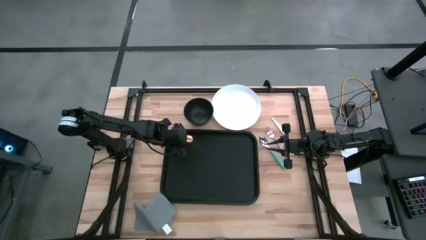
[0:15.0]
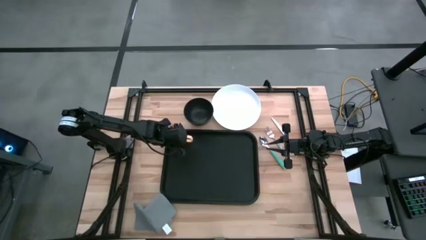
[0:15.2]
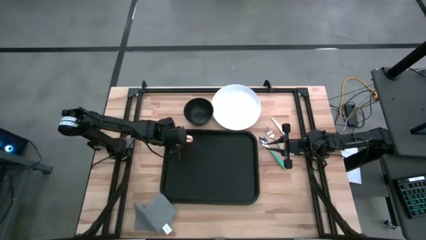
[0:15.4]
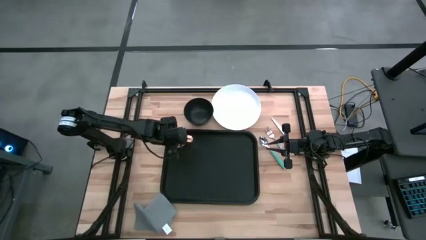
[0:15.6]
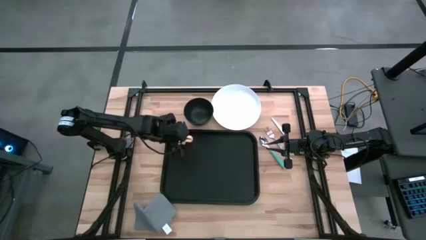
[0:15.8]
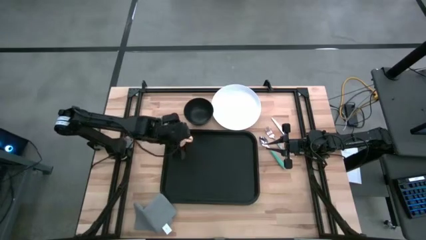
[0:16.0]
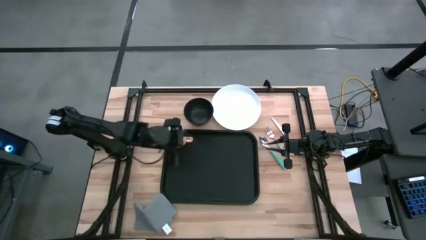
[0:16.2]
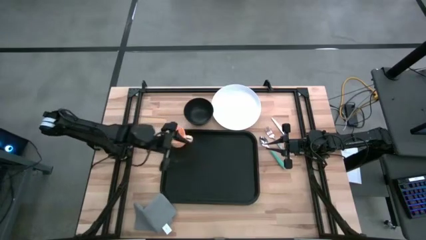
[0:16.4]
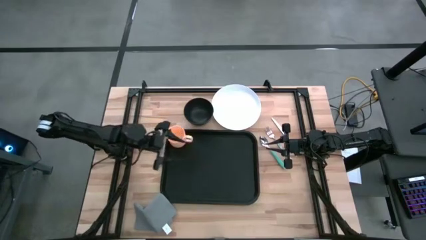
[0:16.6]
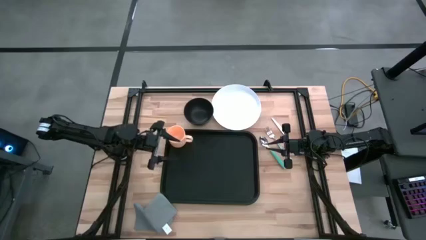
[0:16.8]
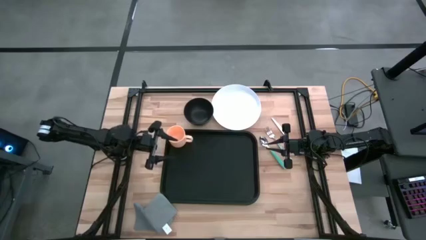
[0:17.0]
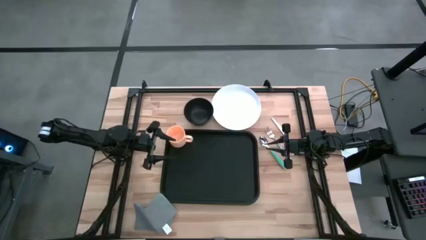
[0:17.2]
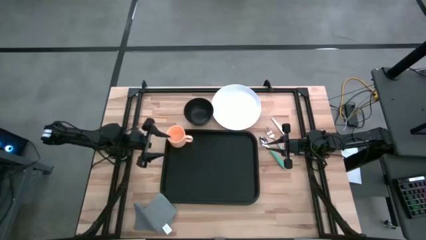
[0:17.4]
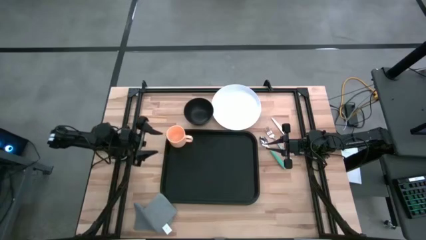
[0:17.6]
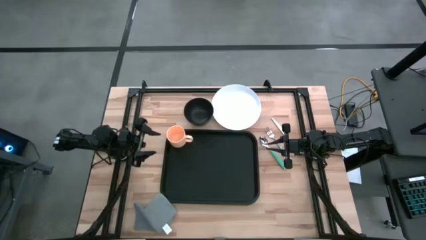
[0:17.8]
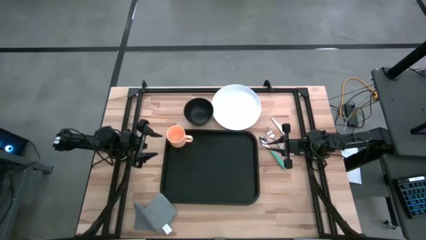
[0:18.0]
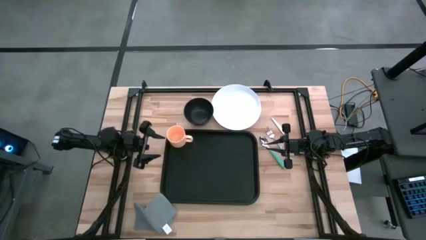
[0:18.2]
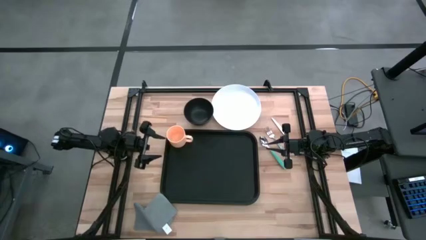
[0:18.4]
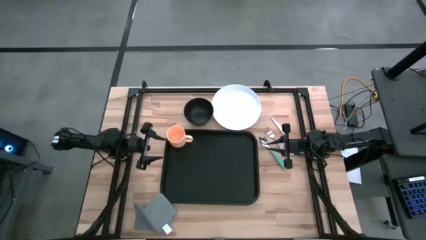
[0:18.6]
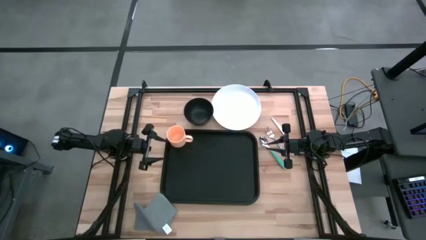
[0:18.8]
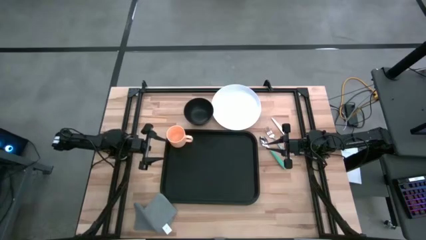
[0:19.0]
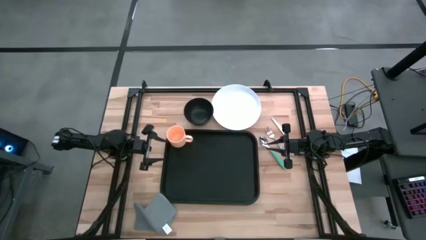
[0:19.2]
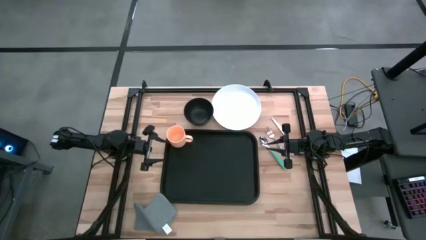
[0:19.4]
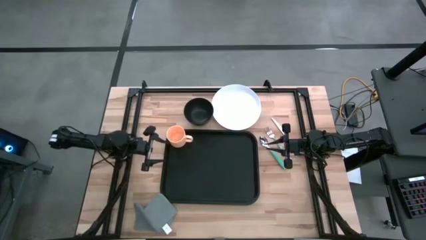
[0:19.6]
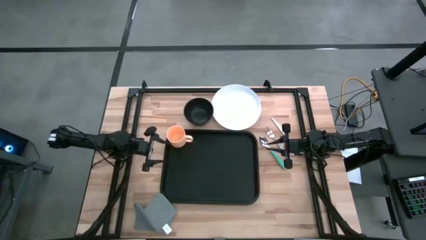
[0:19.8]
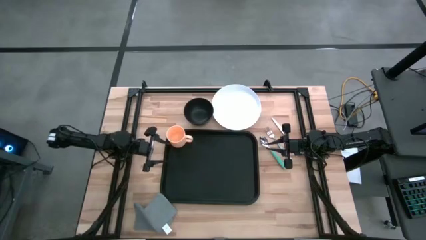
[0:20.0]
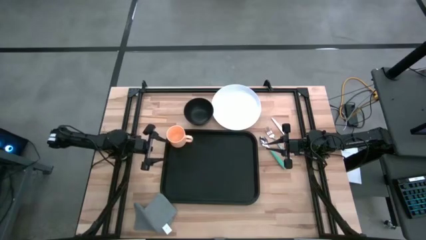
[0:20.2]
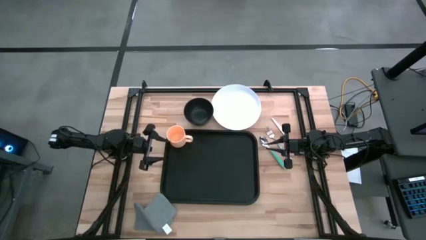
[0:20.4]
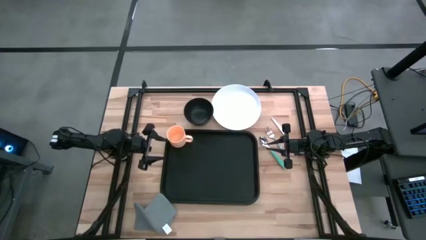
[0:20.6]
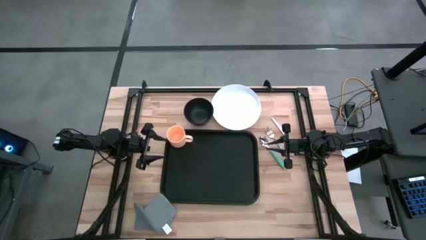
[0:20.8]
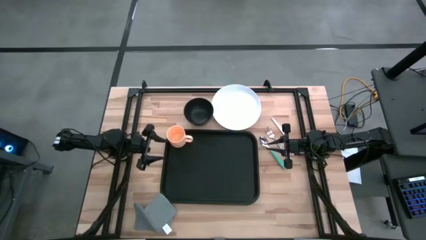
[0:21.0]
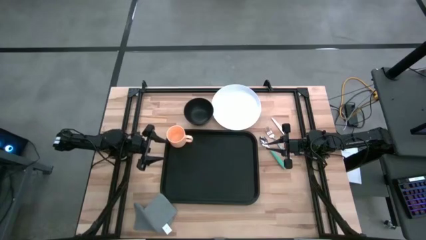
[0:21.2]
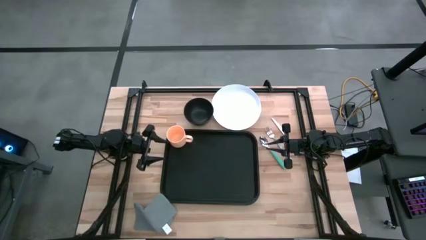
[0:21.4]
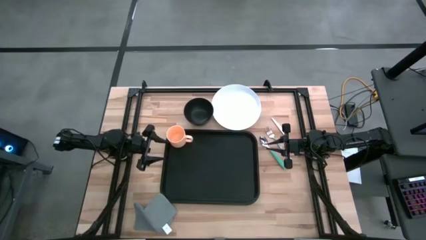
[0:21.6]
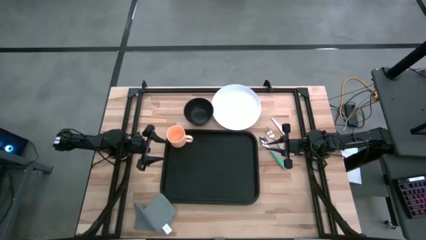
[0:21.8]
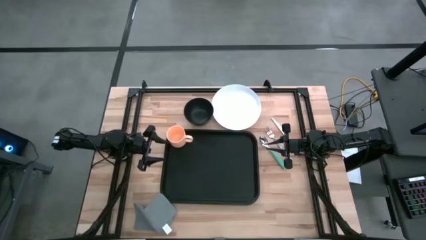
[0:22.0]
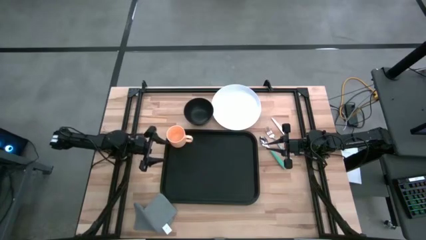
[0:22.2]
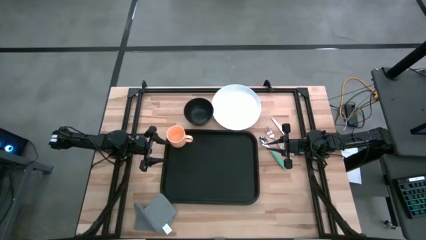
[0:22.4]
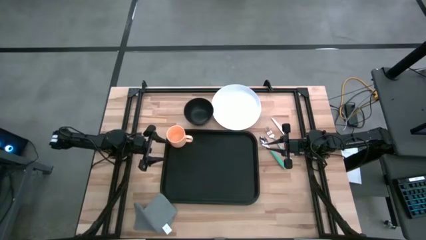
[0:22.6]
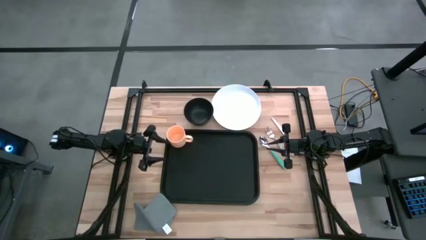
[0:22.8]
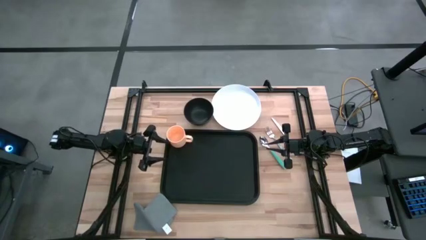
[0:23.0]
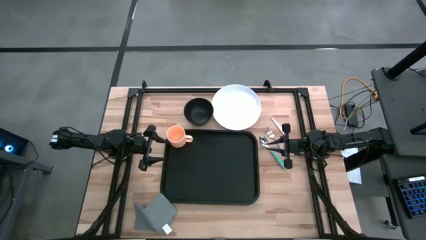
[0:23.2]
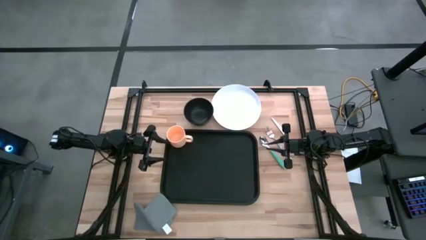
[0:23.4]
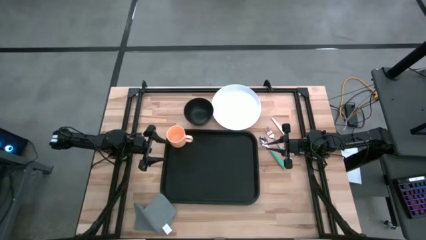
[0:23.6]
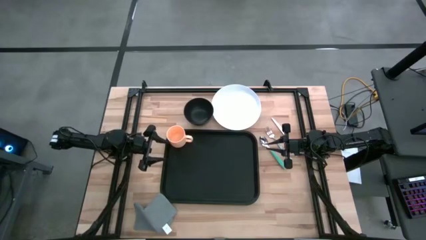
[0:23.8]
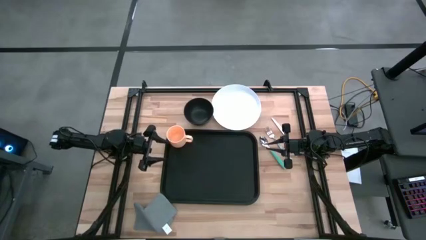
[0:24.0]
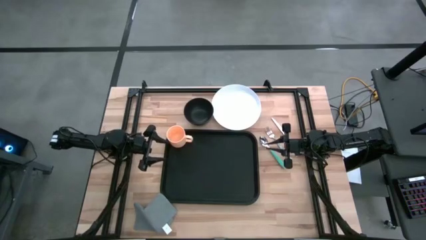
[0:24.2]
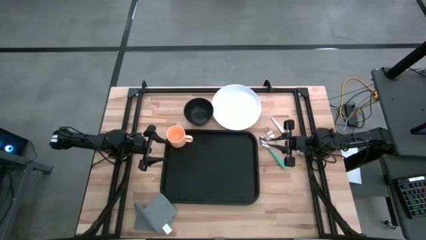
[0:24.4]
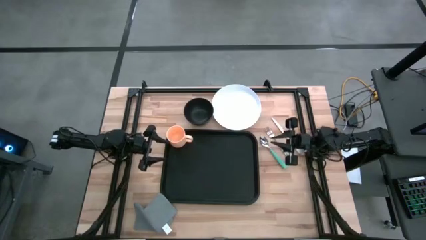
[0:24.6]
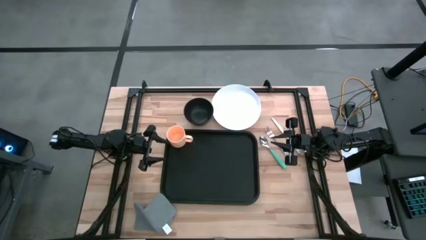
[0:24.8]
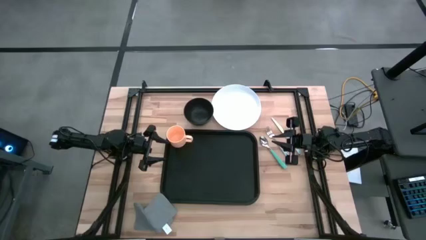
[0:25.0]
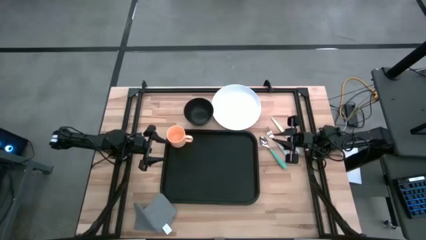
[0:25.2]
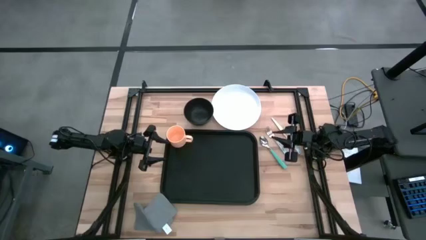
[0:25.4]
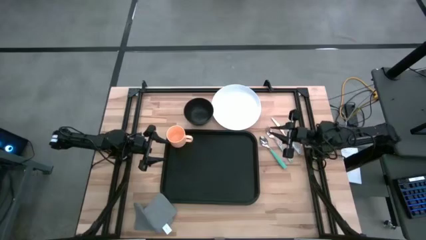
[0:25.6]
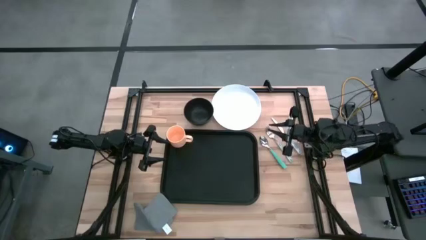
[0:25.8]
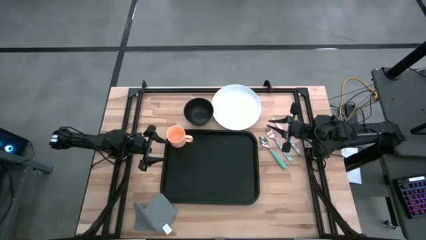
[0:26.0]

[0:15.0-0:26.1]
Task: Set up tray
Put the white plate on the black serving tray
